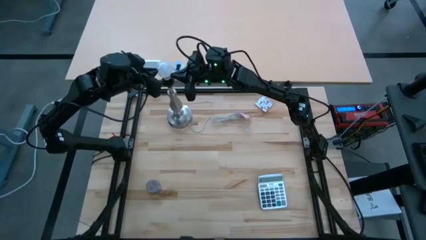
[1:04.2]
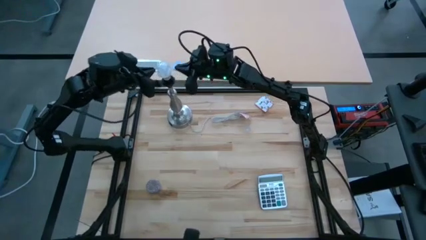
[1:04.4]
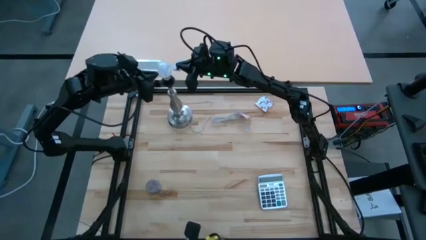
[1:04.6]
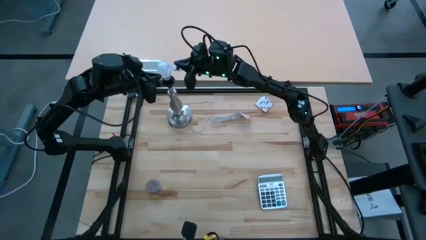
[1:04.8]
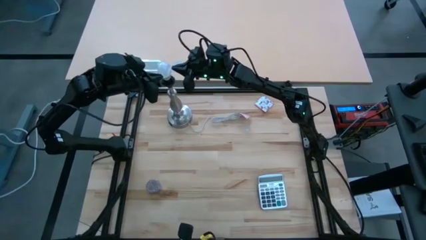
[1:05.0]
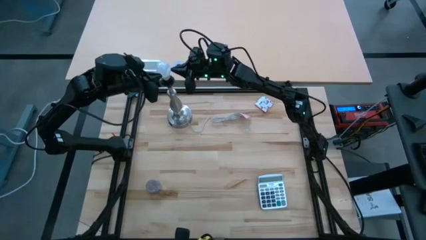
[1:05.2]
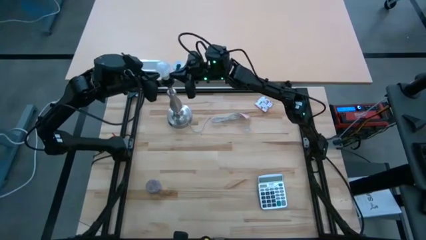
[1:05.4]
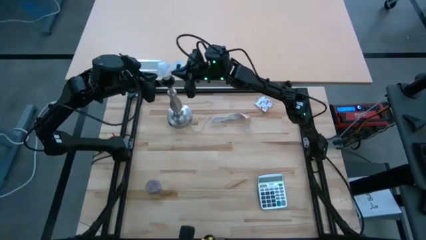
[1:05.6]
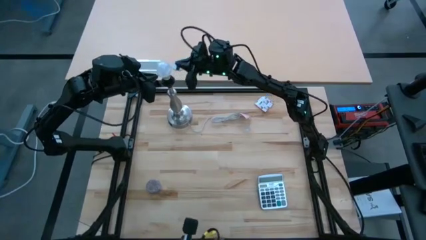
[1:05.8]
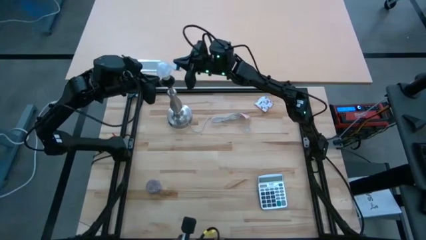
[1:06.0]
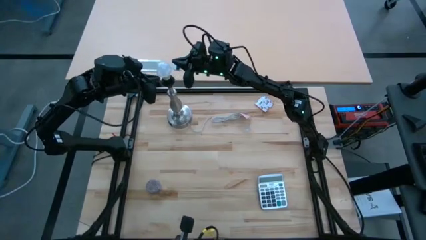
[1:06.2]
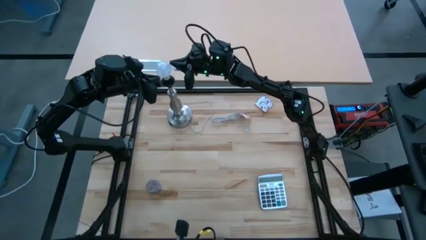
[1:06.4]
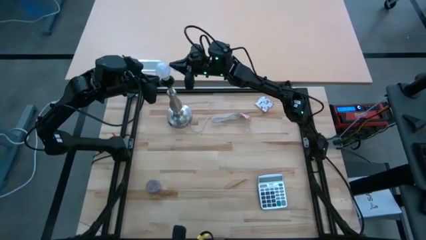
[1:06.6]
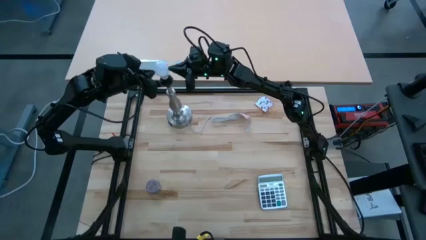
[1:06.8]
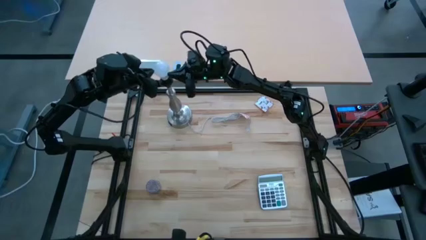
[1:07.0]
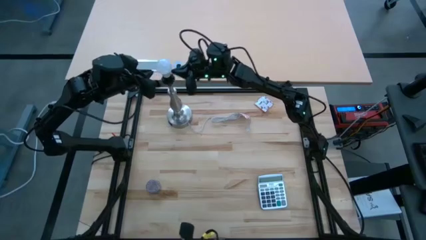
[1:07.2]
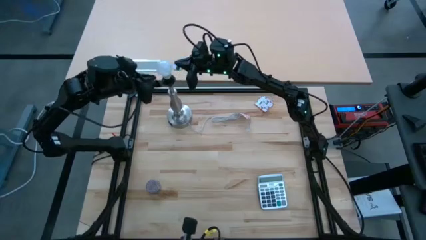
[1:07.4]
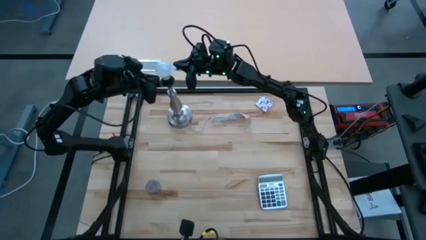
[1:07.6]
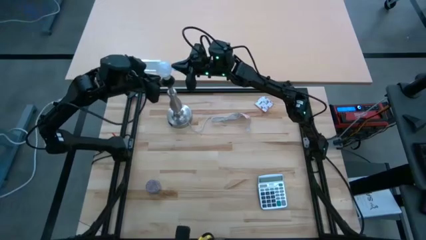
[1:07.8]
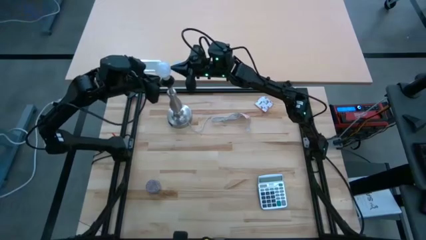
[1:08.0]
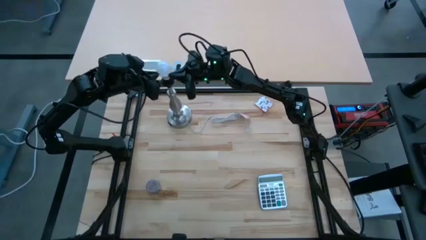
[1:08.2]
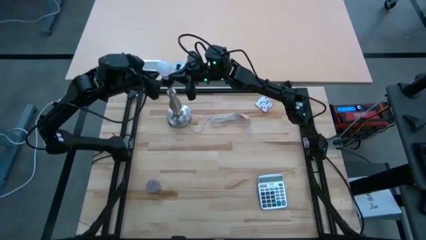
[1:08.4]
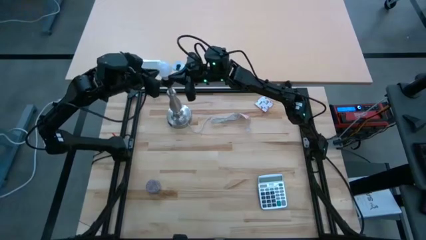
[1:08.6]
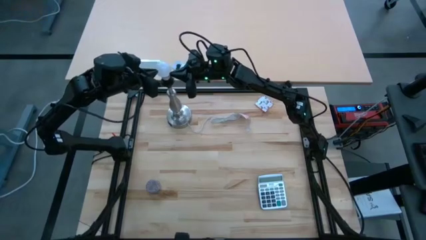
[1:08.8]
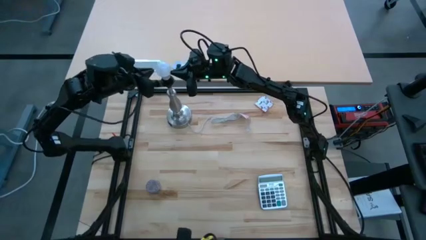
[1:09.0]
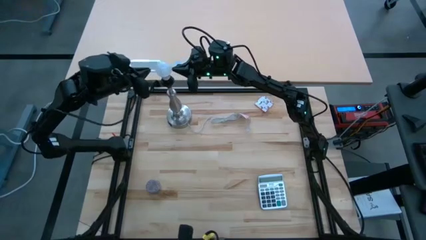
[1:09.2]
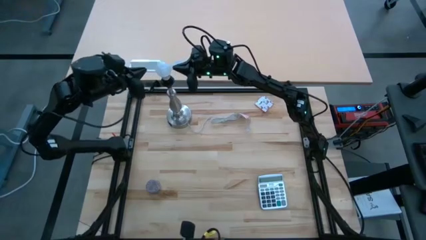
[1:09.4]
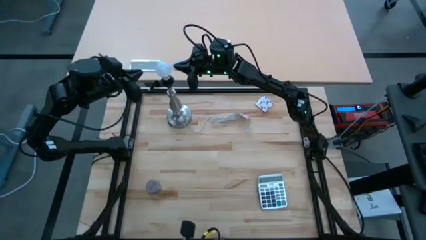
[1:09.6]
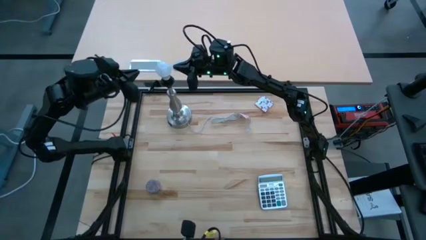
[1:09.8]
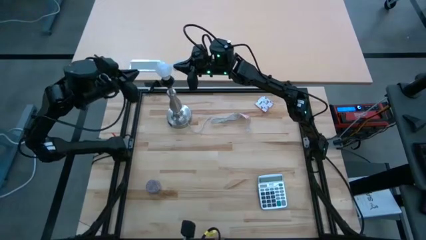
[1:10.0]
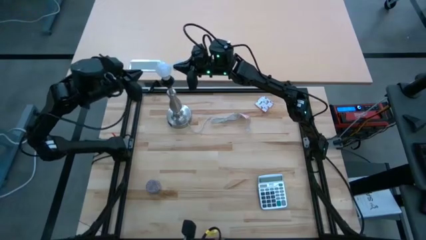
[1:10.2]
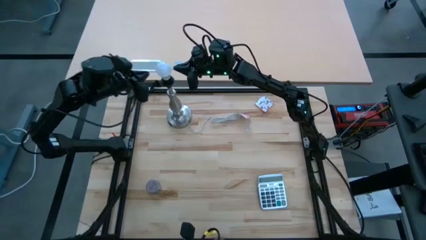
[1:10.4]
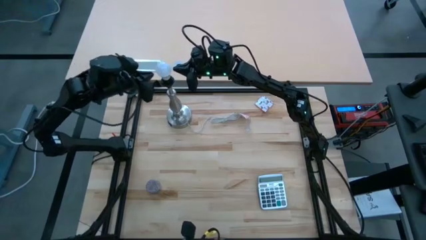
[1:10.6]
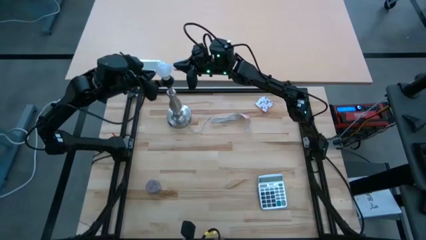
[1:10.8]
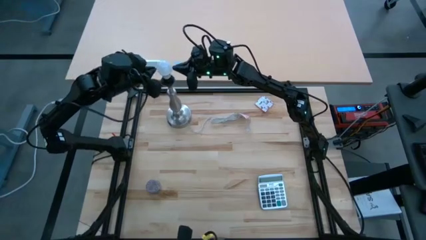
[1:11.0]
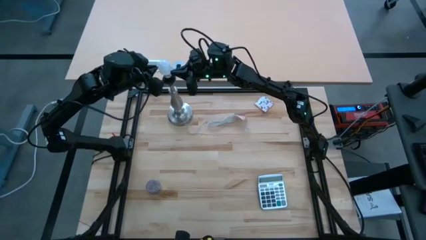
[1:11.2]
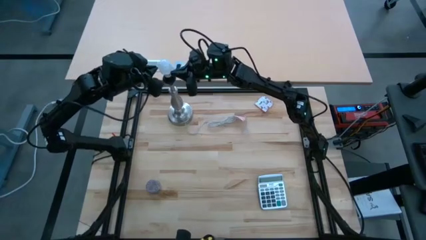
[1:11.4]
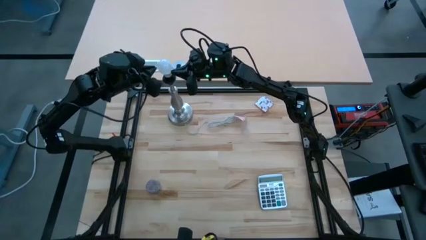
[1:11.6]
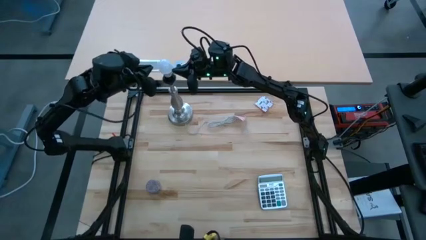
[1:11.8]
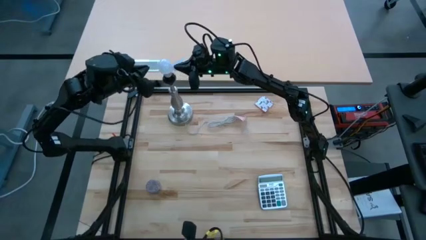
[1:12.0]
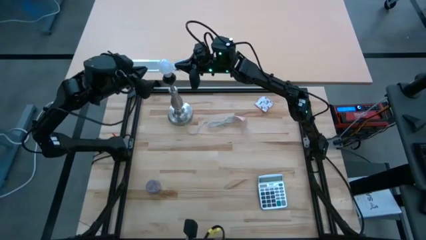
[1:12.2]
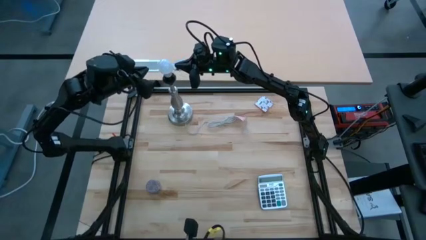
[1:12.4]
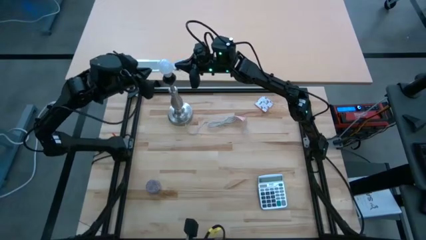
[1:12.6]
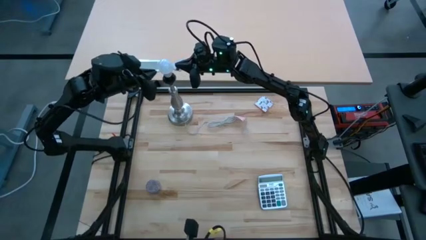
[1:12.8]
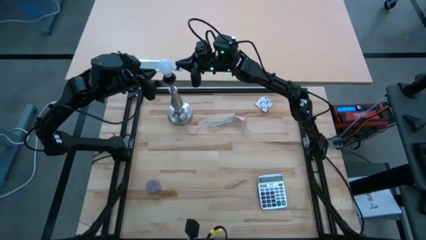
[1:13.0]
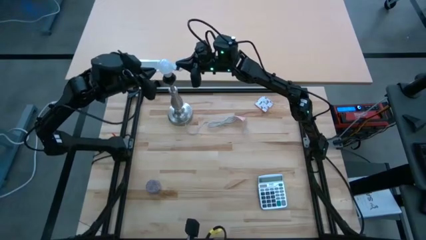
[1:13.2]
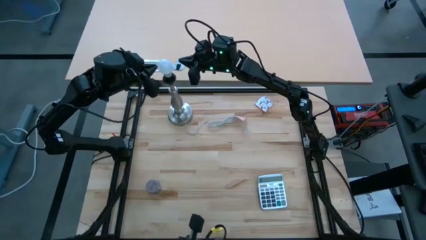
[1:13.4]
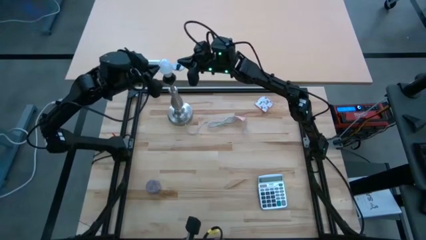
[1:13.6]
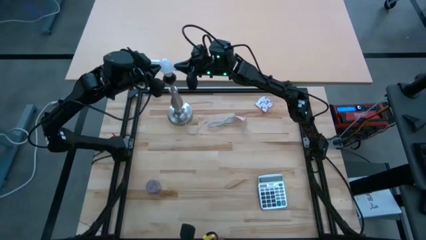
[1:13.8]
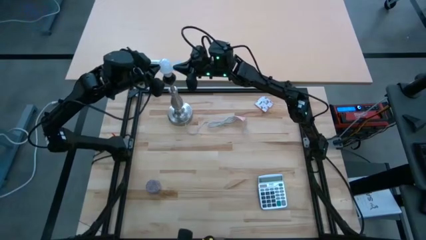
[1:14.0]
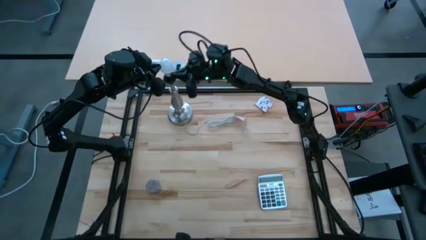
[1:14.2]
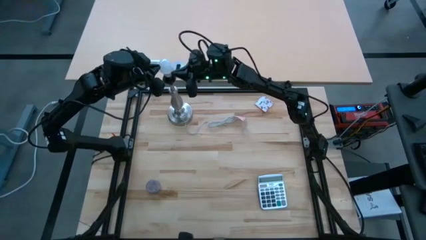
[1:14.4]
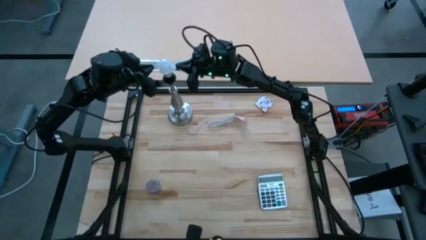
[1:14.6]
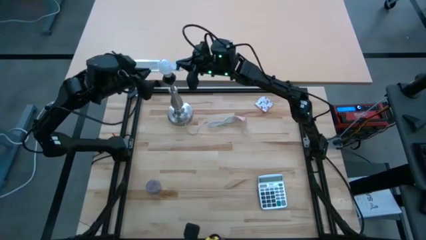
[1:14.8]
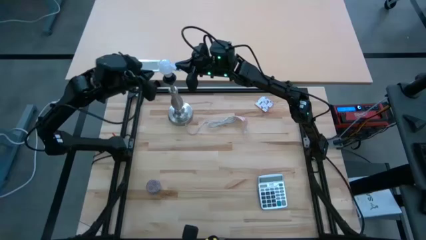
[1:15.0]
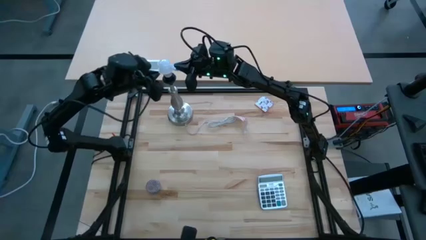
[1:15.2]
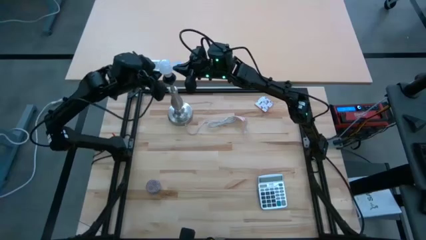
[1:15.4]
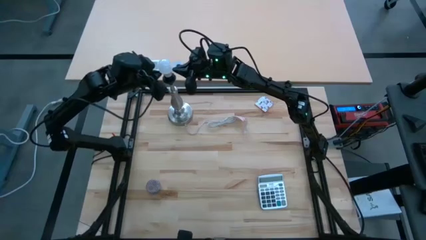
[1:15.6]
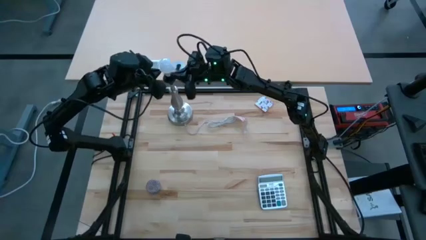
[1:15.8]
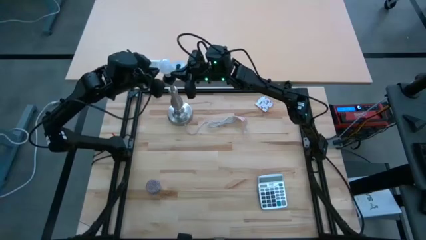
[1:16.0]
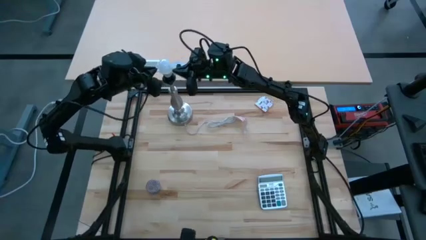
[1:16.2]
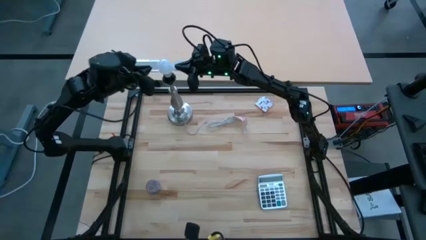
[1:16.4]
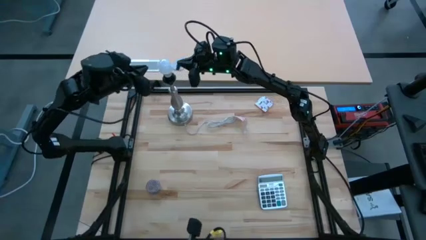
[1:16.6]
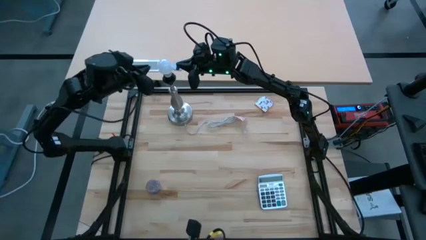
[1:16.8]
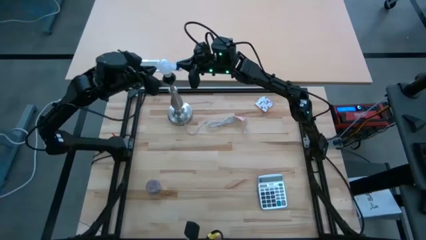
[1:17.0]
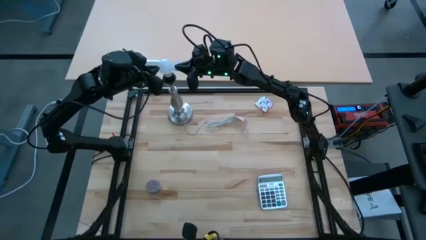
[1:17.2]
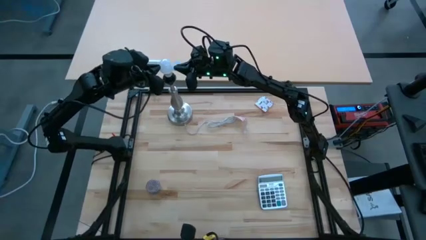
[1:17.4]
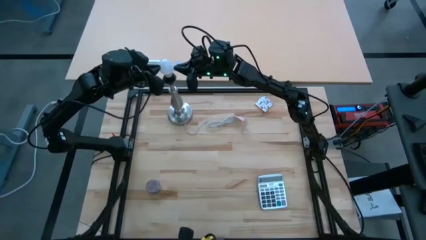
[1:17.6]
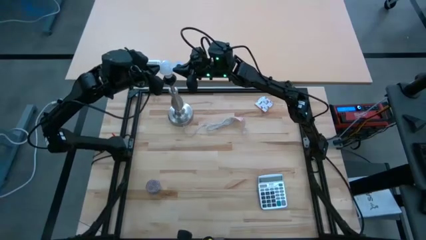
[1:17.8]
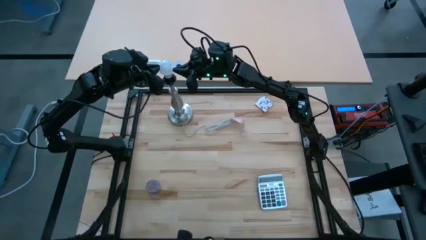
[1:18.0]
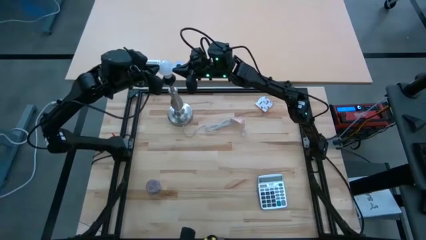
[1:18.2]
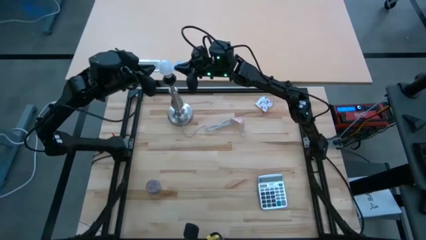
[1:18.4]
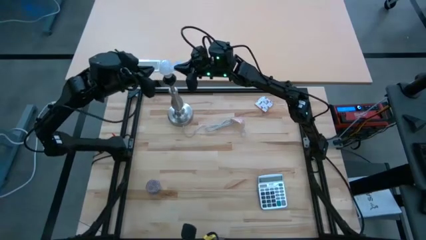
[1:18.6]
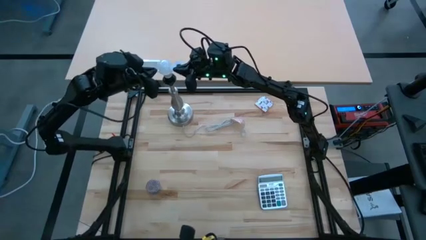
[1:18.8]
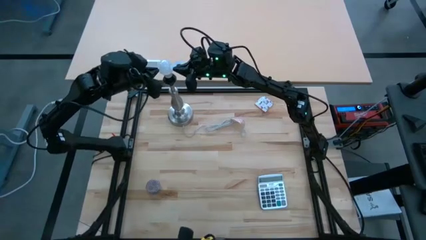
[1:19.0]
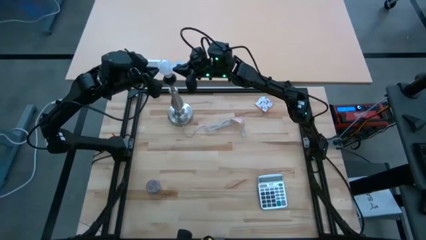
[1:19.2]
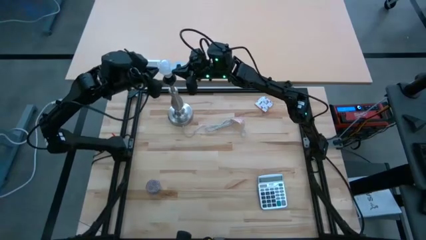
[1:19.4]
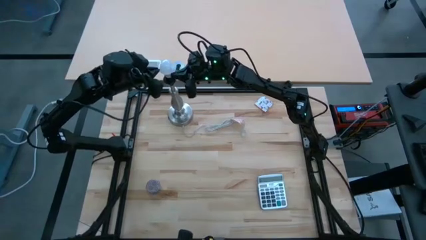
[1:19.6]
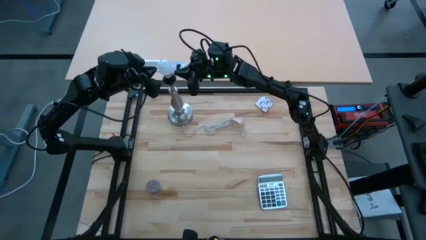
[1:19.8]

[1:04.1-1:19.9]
Task: Screw lightbulb
Insert the lightbulb into the lamp

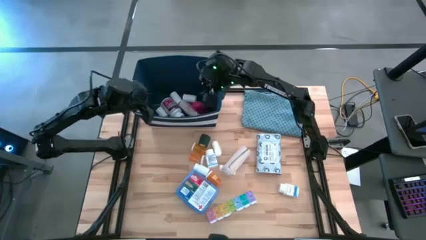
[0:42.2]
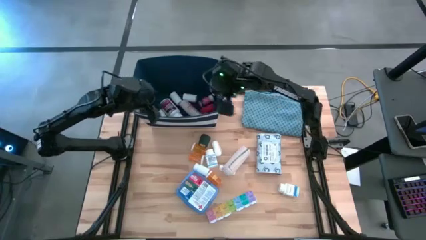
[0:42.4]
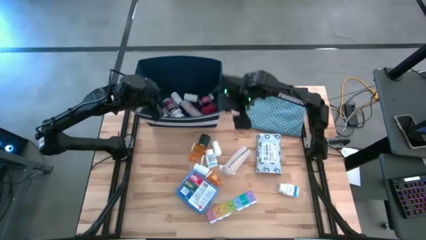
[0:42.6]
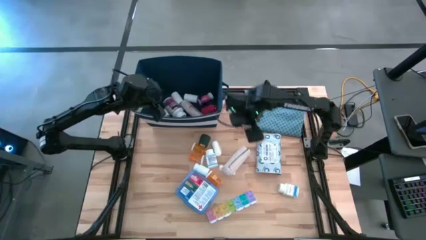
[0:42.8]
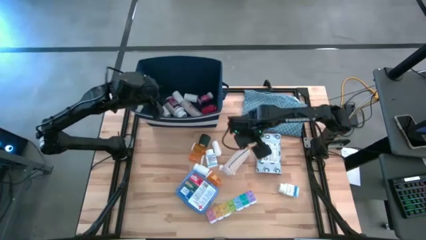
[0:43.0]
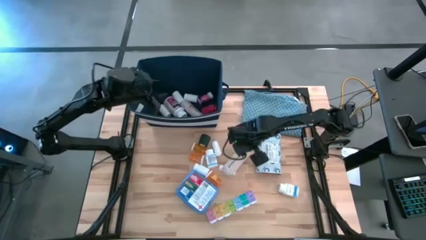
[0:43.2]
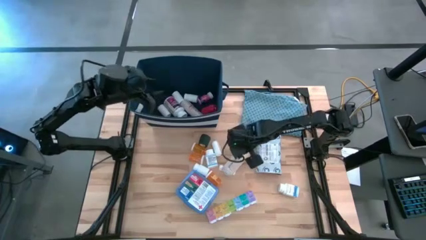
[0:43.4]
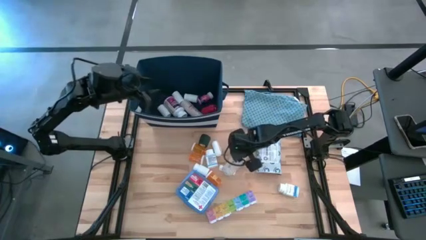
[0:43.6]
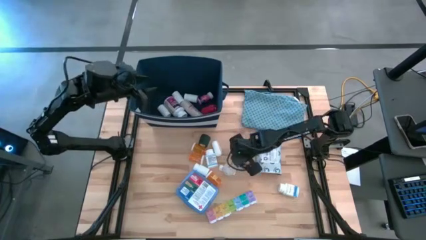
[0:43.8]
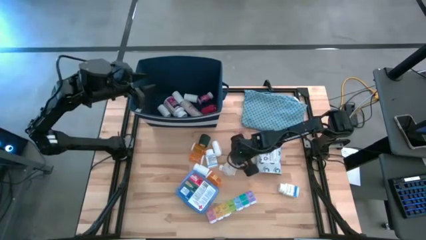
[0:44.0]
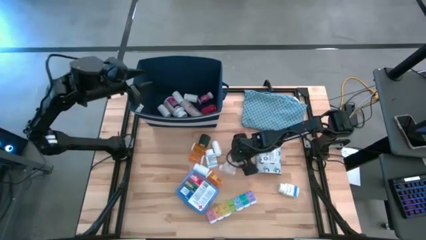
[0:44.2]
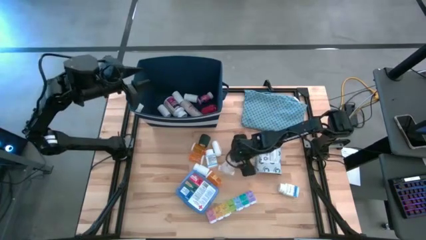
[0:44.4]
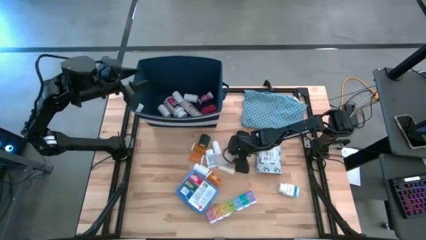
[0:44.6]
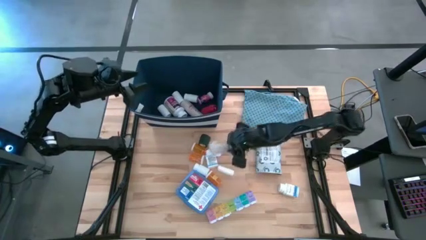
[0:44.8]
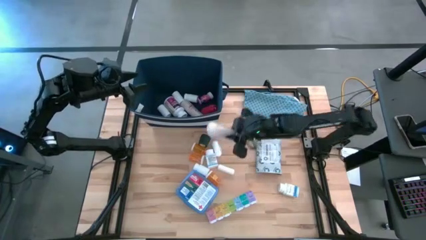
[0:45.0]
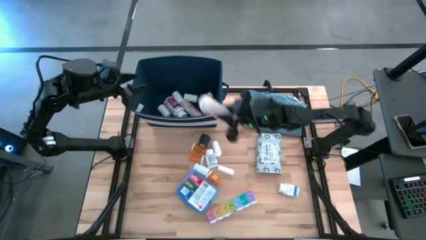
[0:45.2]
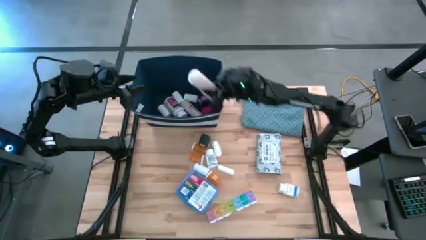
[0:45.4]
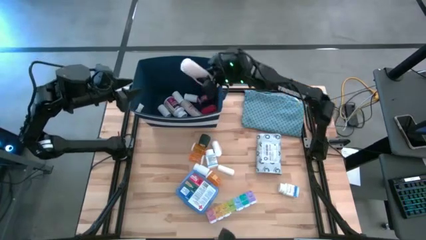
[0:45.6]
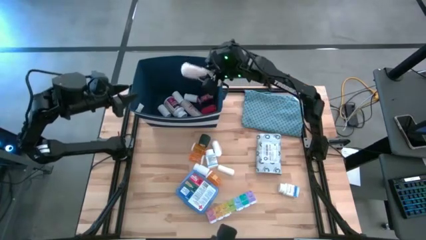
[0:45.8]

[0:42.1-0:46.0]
Task: Pick & place medical supplies in basket/bin
Put the brown bandage into the blue bin
